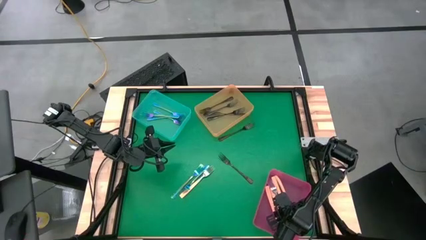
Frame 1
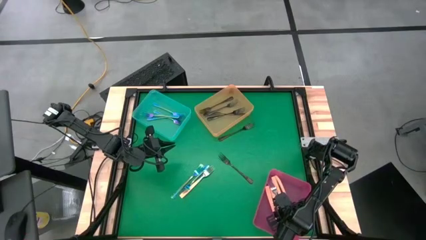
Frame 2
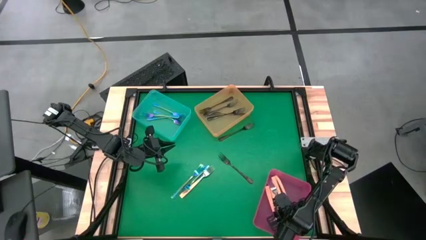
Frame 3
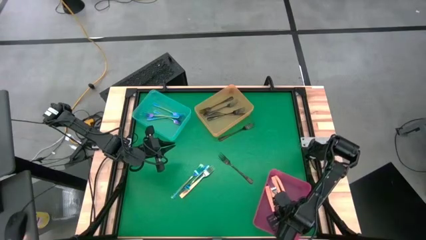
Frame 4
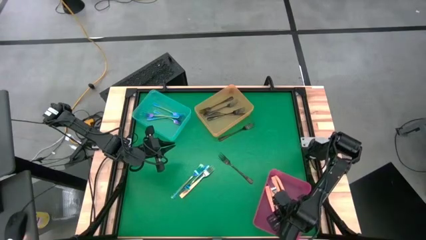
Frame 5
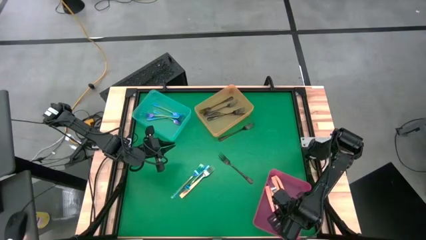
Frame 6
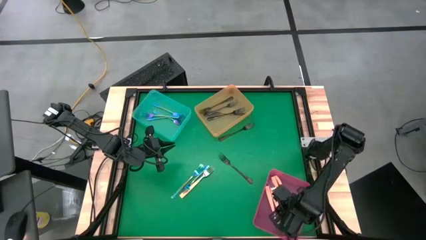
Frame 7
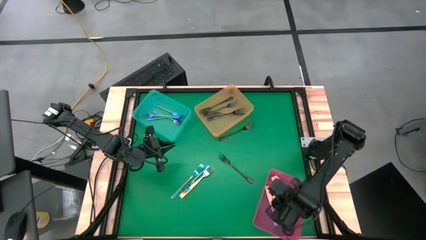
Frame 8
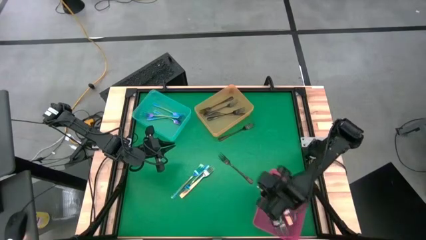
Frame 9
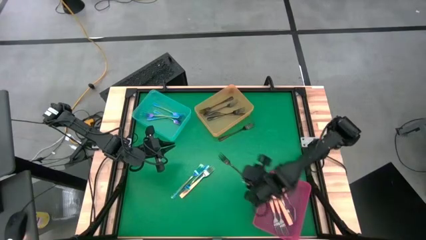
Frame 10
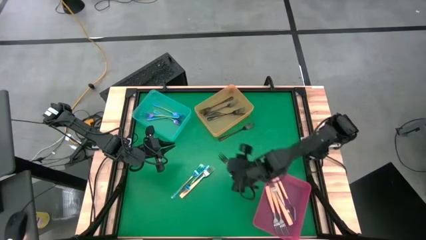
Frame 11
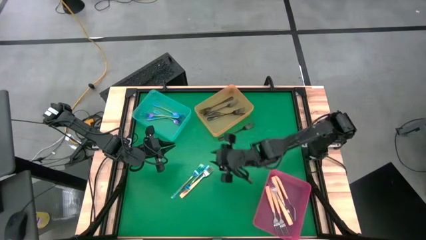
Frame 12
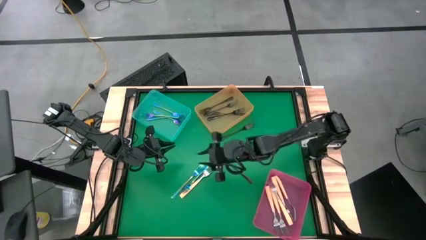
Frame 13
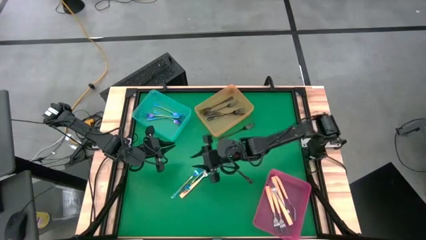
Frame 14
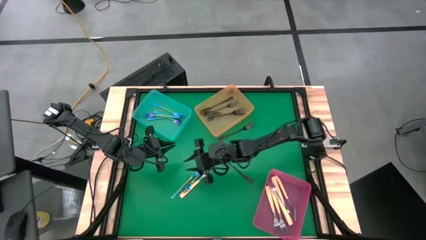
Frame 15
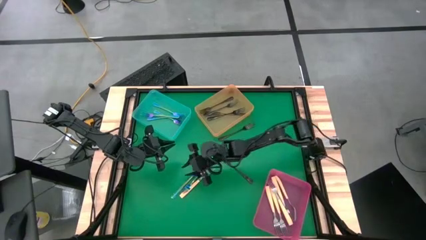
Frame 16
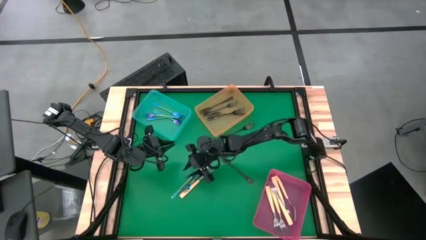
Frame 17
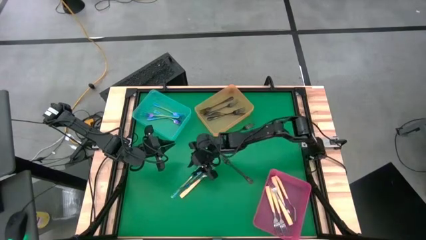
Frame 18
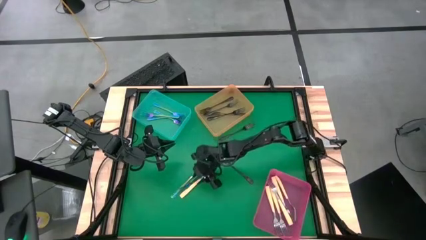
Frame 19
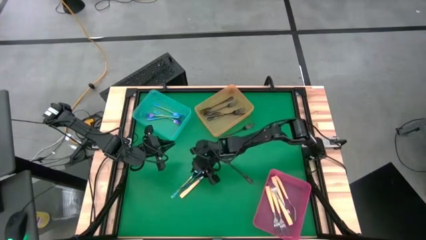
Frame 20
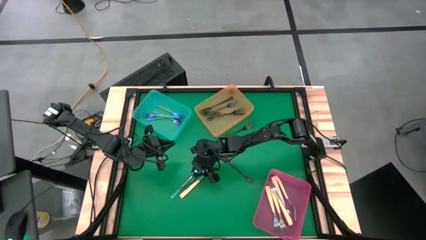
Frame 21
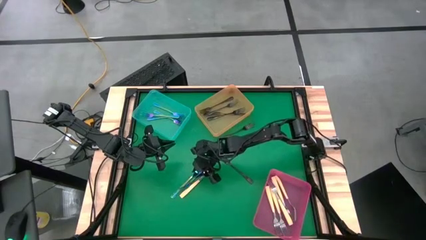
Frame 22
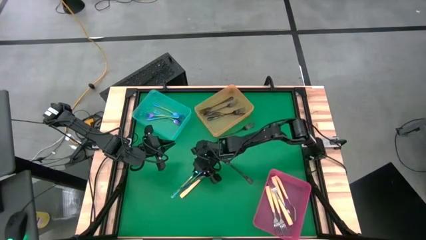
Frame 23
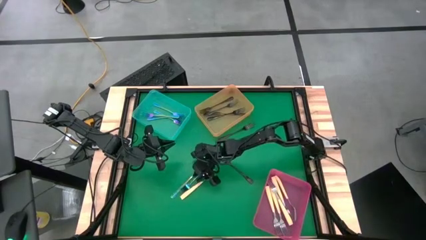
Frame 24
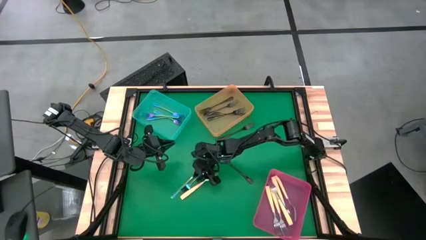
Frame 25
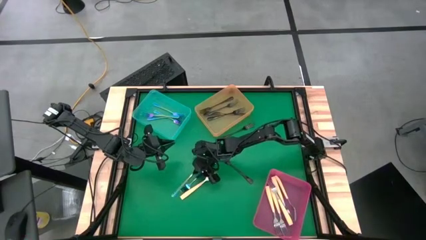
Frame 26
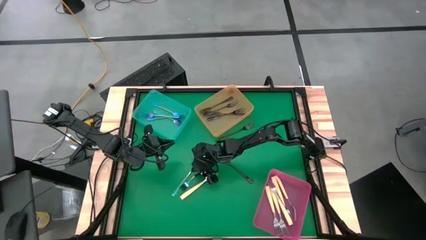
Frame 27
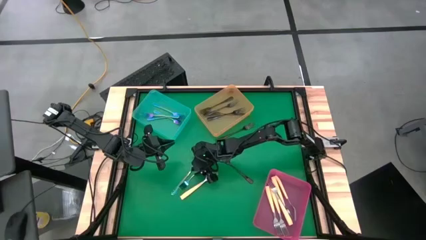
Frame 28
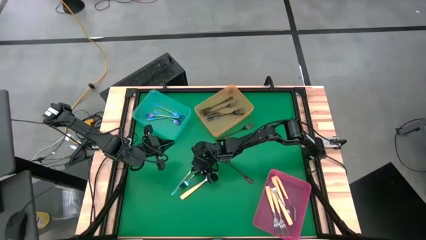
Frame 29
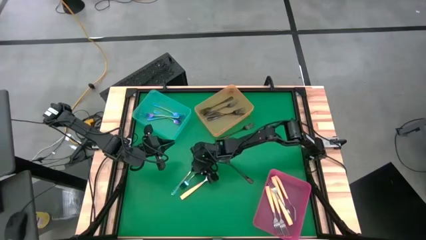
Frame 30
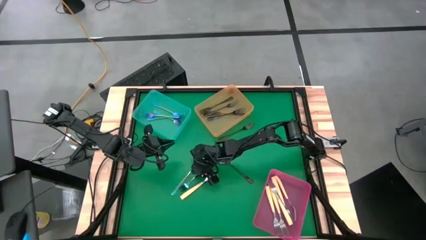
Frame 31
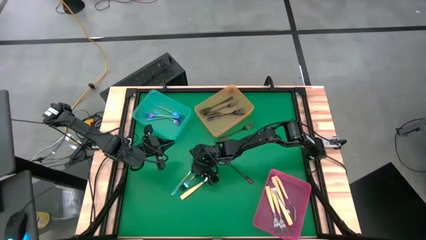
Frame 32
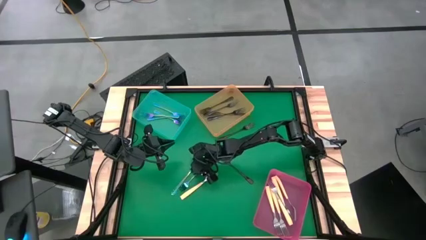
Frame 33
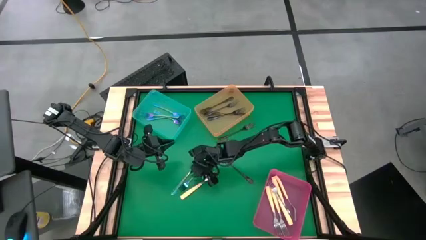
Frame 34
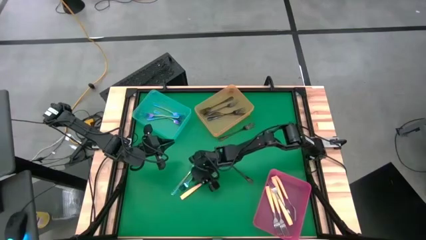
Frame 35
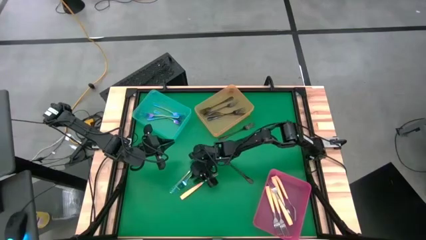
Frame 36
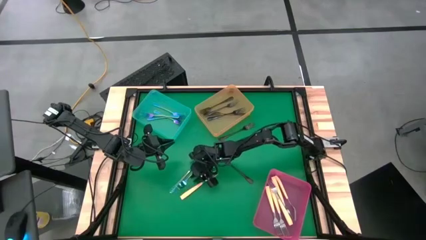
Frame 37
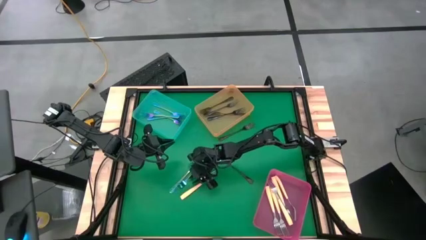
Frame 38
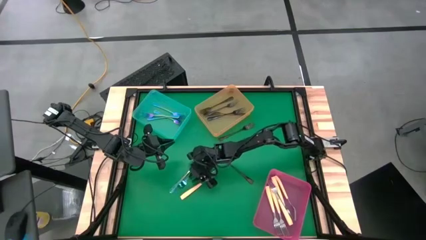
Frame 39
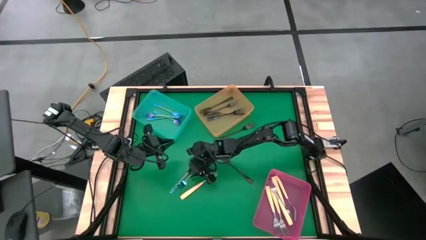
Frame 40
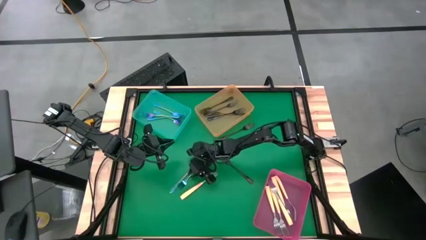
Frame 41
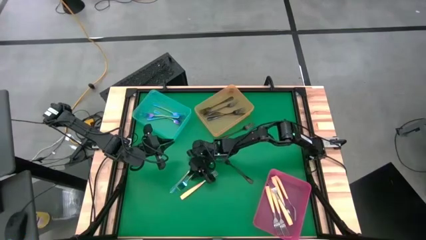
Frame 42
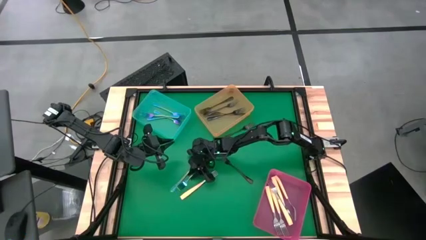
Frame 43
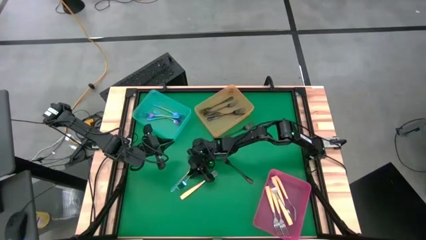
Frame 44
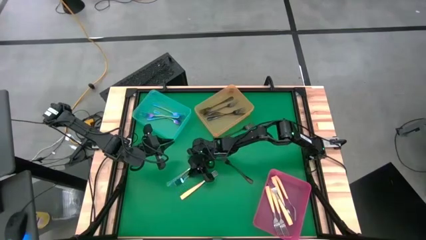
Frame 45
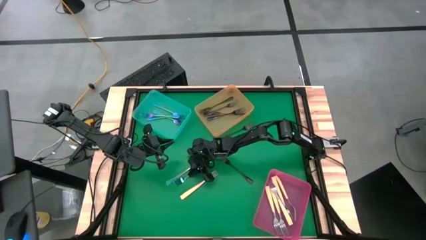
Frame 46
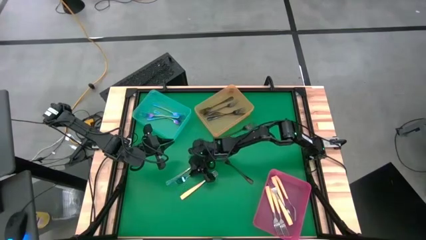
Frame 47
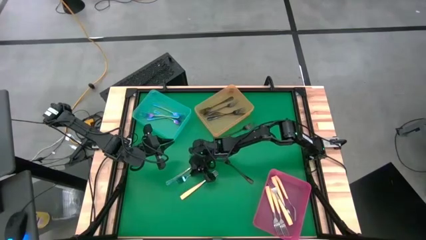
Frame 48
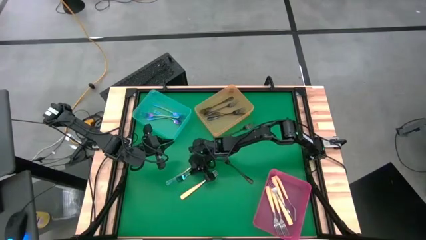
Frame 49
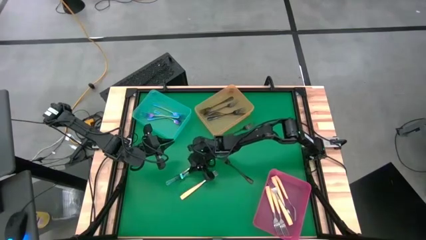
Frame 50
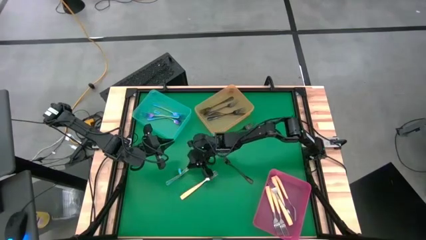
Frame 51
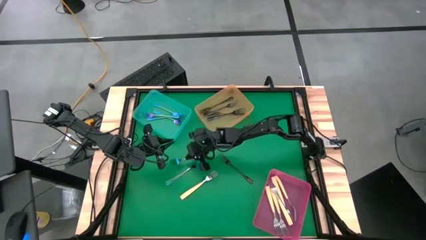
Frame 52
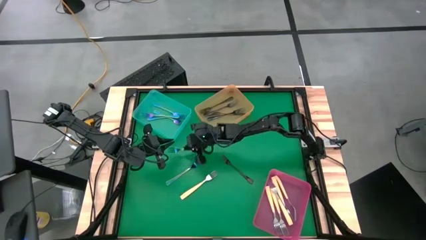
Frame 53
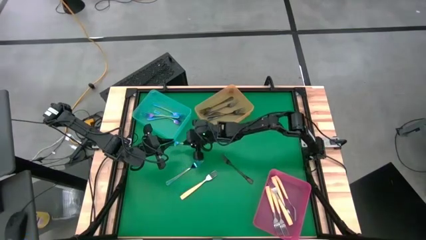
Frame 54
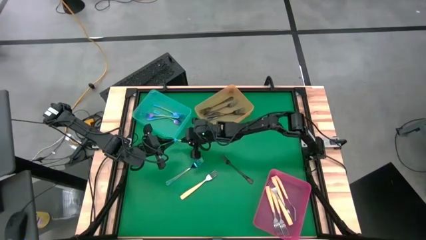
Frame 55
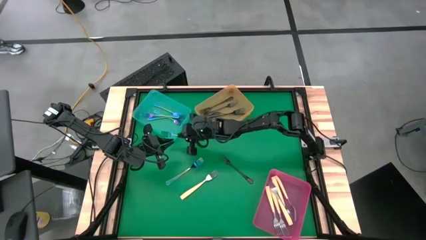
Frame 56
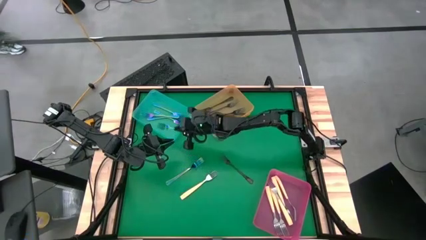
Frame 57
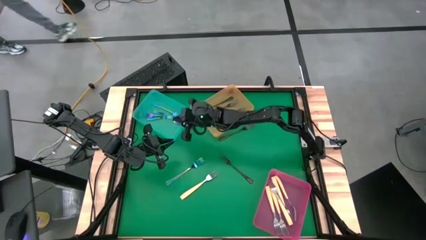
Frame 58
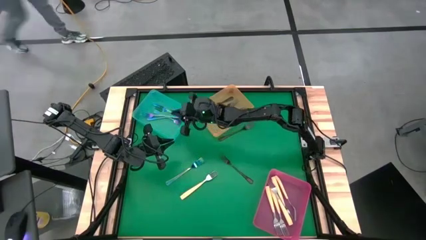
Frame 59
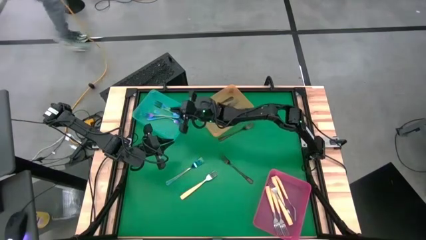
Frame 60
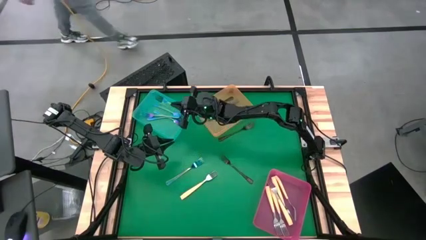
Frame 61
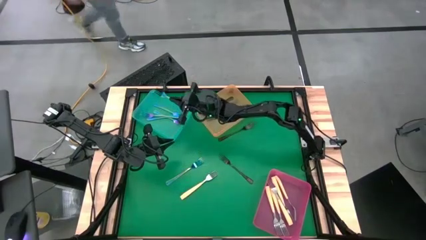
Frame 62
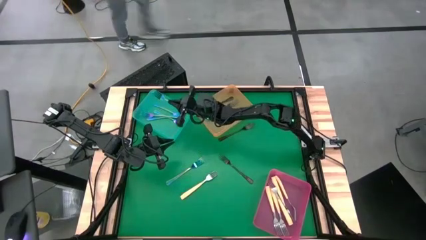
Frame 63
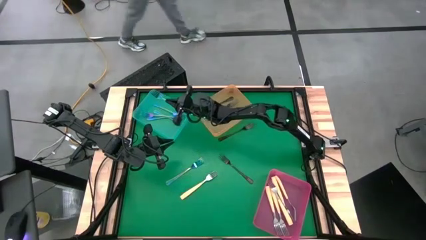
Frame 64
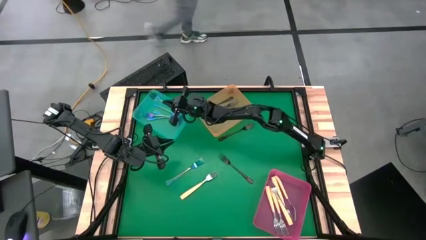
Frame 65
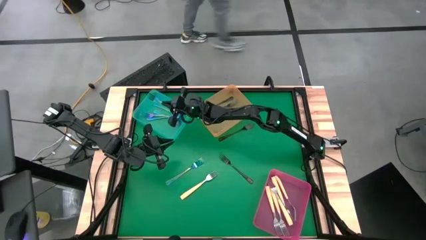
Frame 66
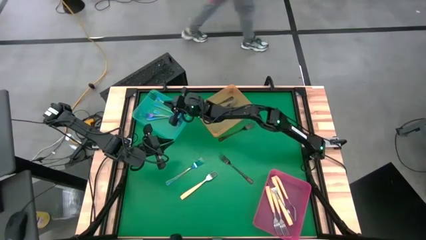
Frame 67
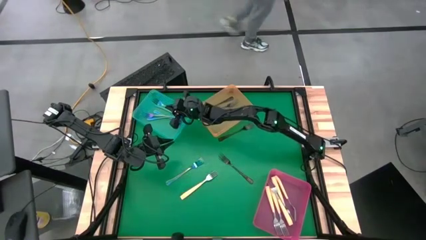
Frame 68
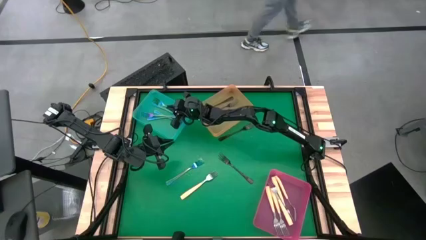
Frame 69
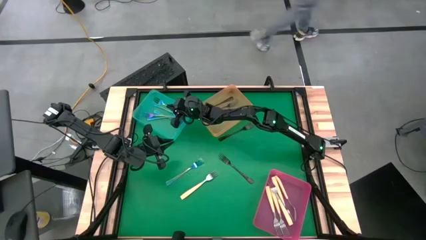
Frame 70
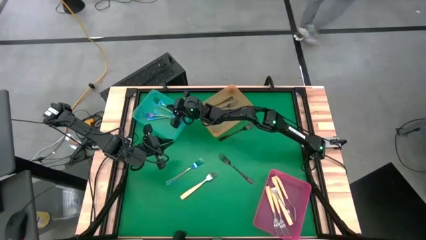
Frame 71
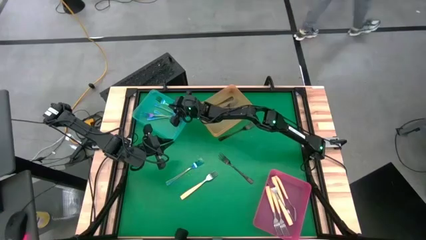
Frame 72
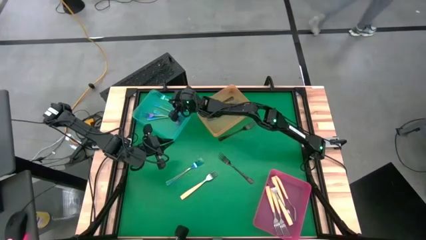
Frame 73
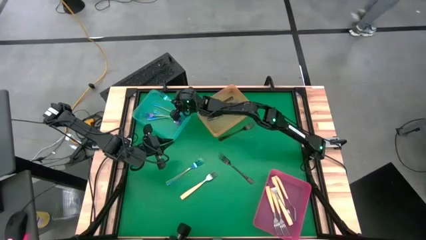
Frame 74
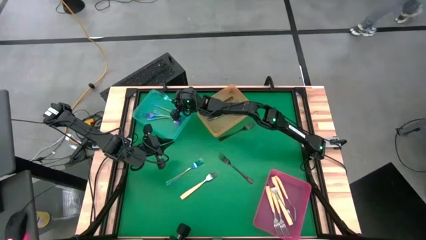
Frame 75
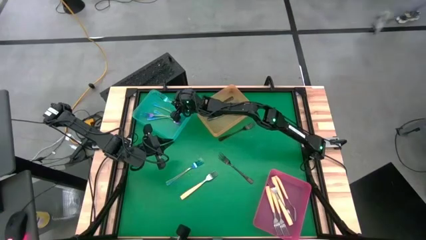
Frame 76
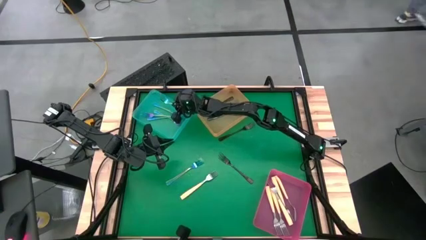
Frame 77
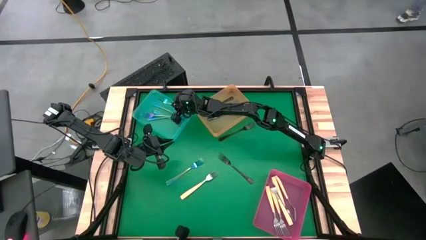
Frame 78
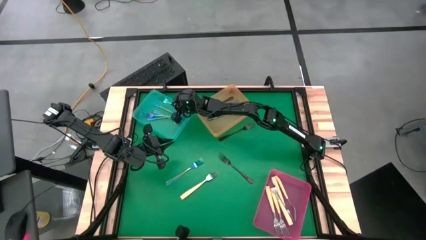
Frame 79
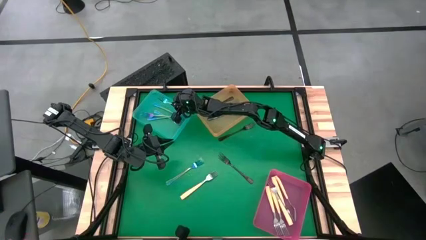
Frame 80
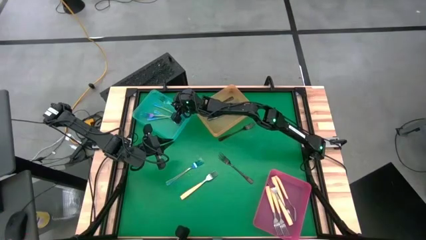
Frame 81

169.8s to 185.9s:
Task: Sort silverware by color (type)
Put the blue fork into the blue bin
